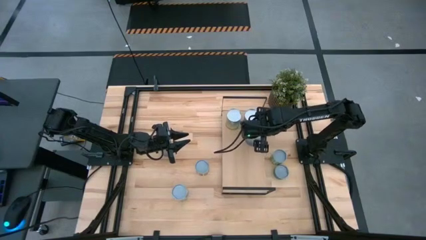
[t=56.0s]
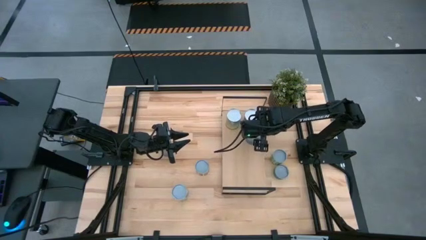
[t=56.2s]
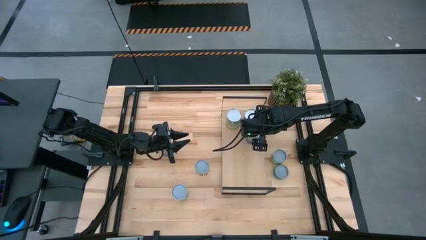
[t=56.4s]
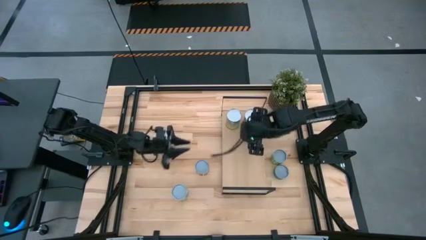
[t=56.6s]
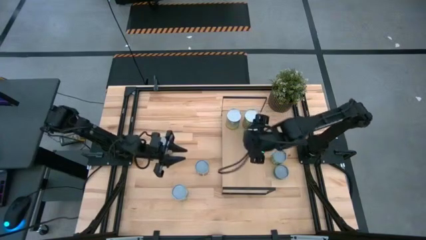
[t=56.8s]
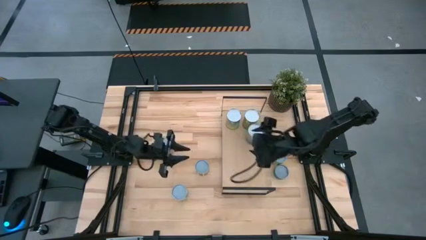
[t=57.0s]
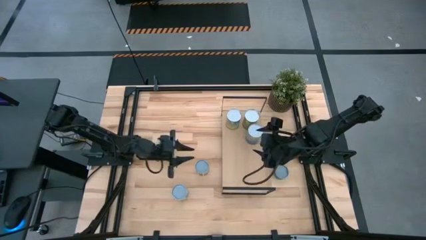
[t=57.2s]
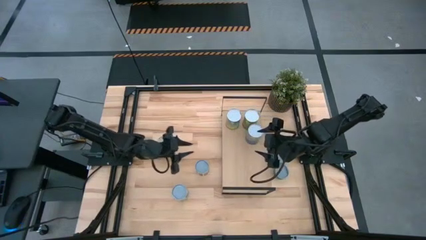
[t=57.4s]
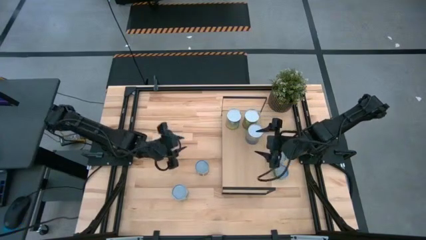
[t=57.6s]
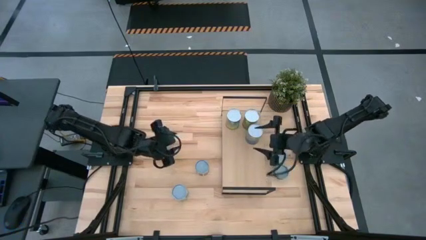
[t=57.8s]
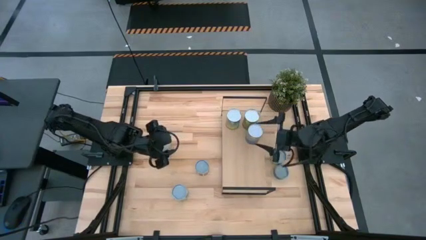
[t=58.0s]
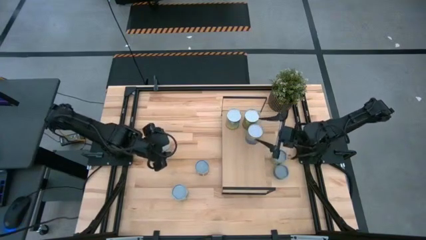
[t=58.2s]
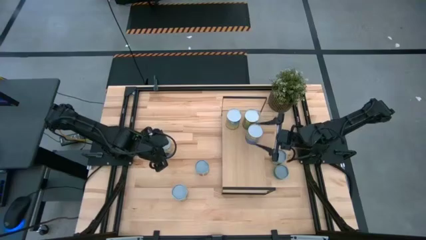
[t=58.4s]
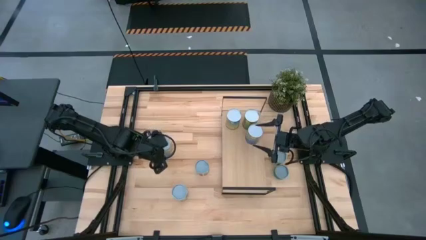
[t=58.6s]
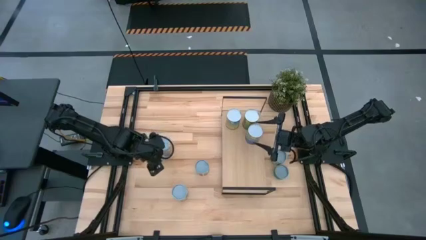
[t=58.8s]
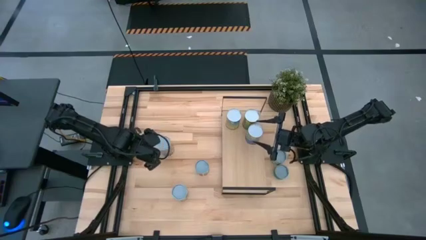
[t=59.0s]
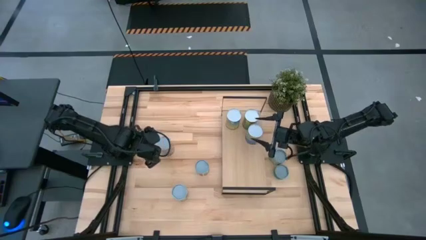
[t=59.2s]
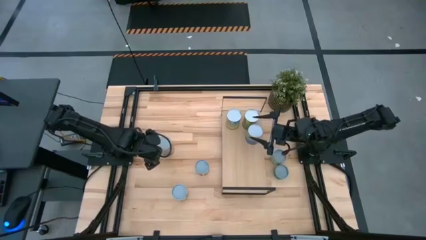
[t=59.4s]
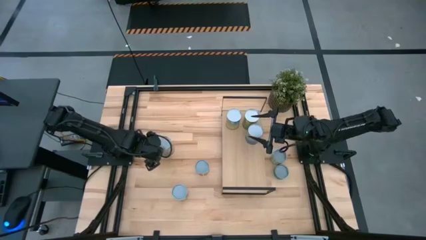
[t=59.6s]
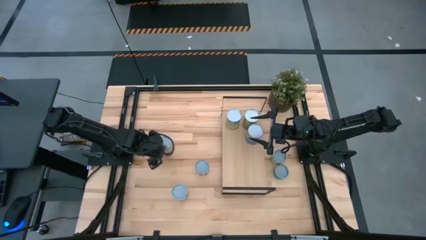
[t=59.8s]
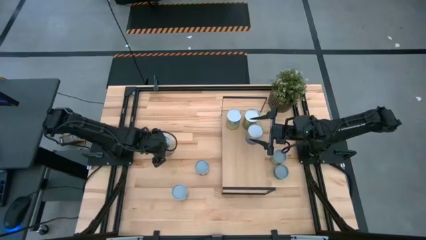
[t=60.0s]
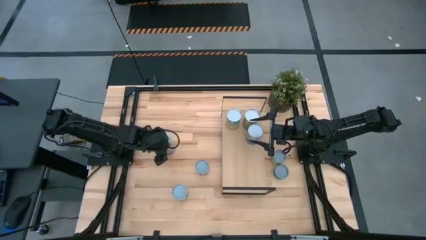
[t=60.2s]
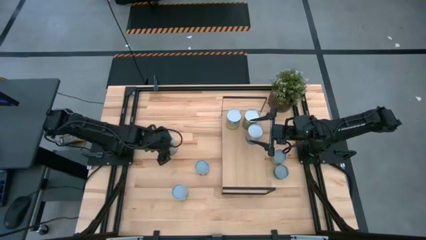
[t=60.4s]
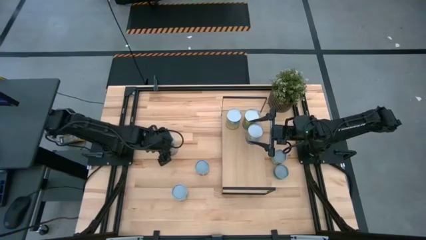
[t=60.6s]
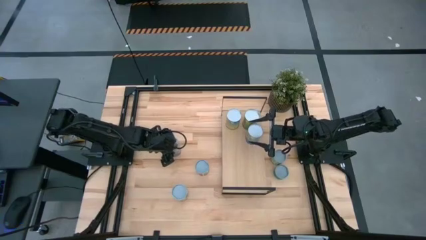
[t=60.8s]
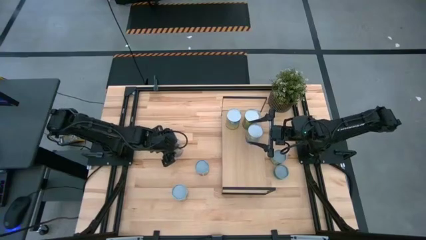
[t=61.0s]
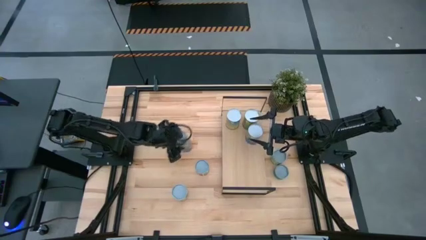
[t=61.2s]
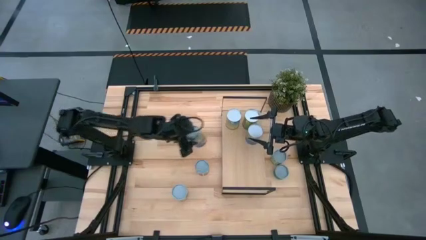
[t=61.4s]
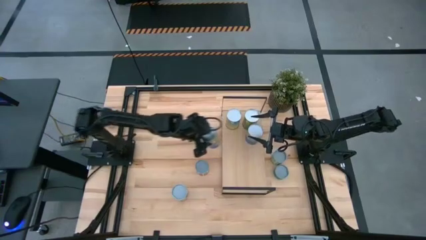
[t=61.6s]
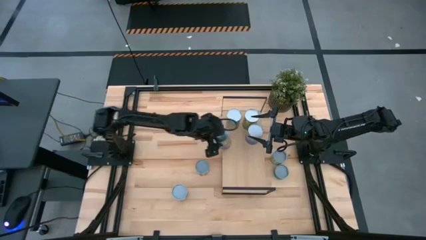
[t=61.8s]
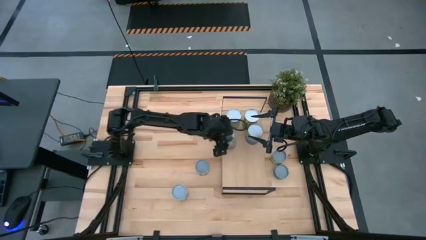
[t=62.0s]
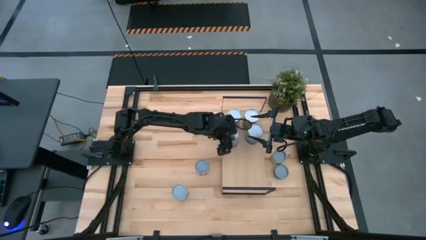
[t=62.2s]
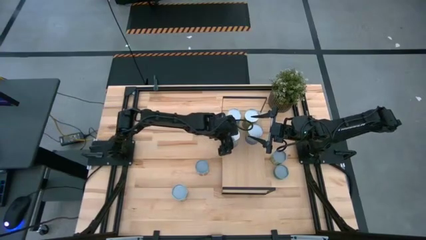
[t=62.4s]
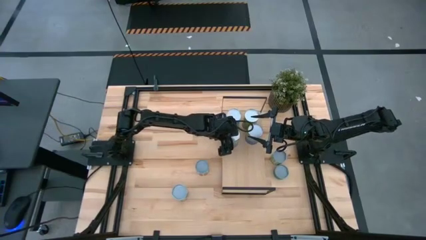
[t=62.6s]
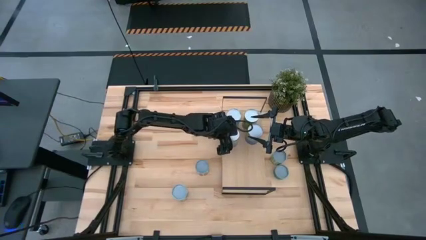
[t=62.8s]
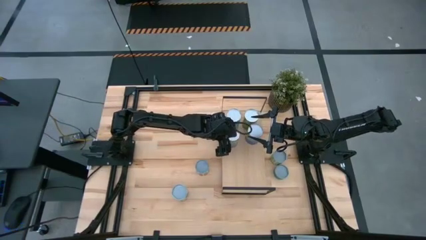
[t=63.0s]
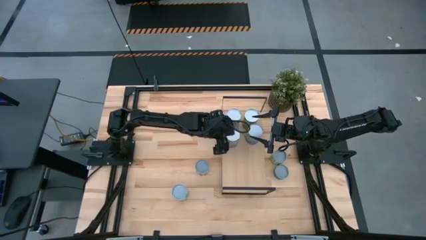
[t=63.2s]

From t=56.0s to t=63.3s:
Task: Pick and place cans onto a shelf
Put the canned peaches on the shelf

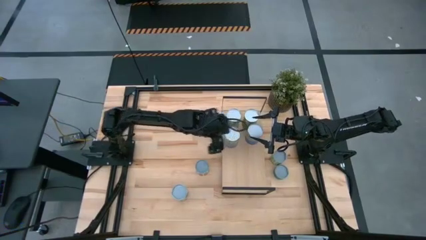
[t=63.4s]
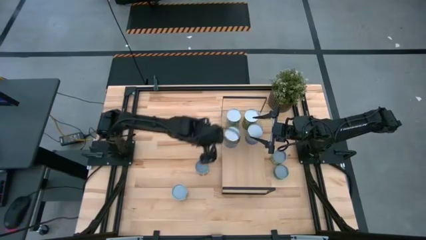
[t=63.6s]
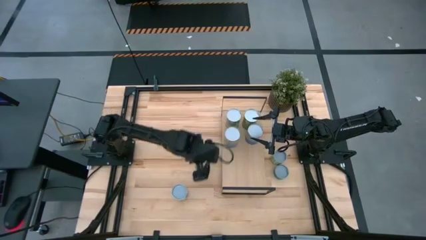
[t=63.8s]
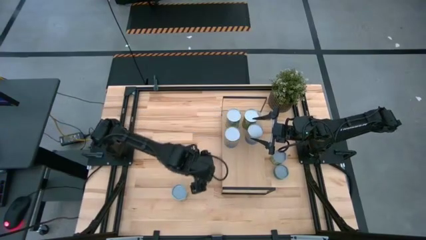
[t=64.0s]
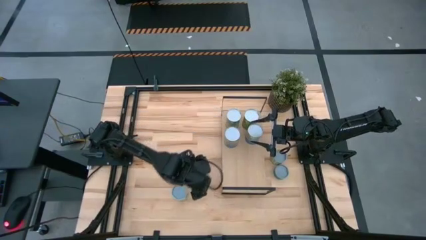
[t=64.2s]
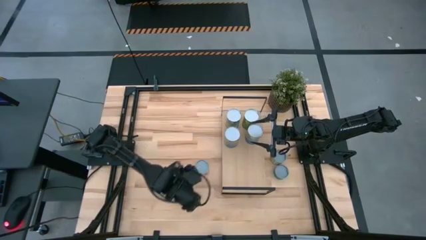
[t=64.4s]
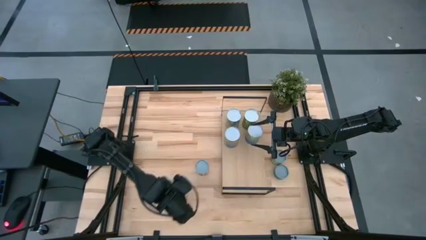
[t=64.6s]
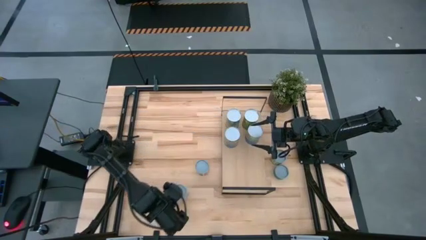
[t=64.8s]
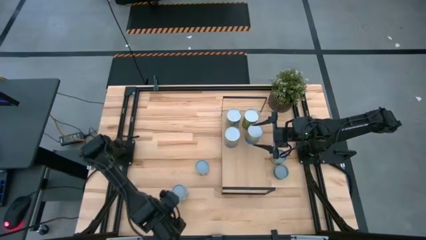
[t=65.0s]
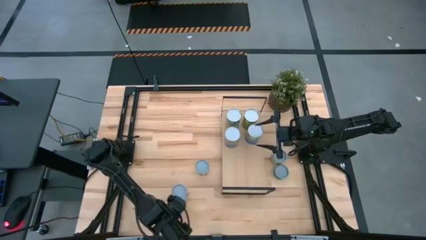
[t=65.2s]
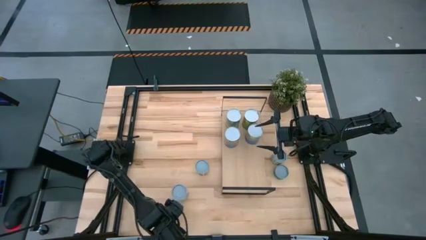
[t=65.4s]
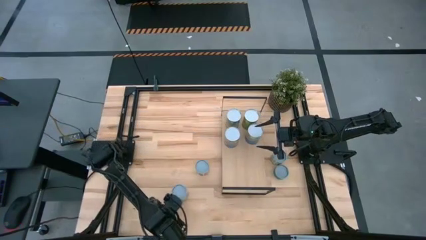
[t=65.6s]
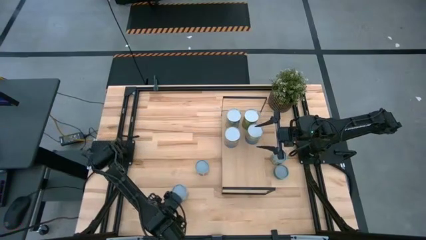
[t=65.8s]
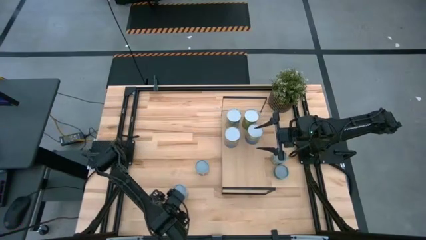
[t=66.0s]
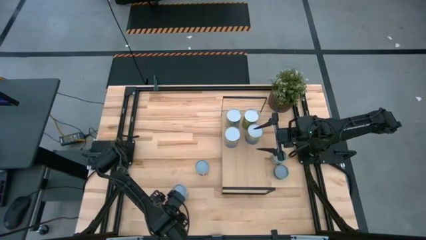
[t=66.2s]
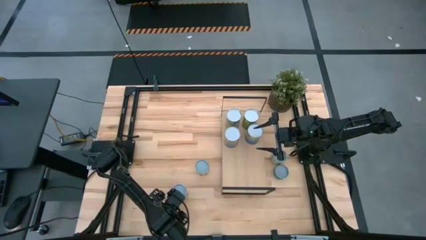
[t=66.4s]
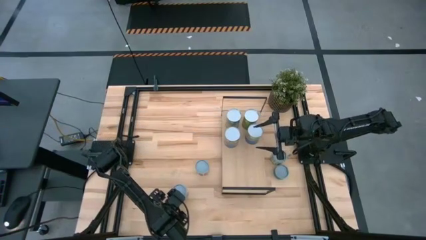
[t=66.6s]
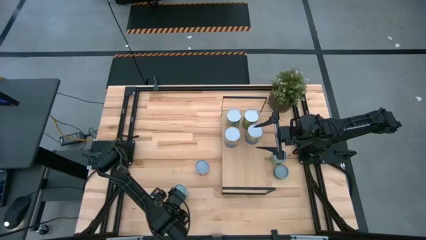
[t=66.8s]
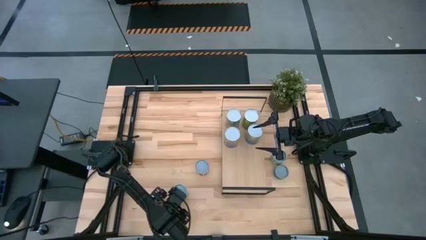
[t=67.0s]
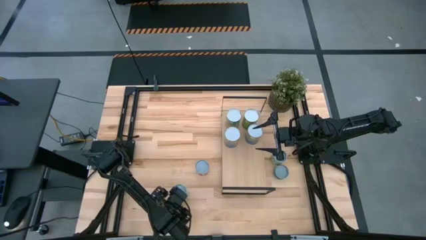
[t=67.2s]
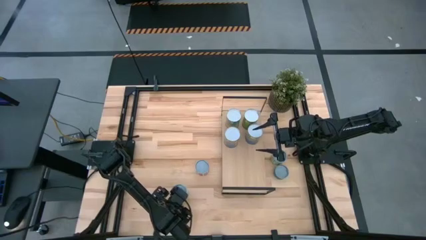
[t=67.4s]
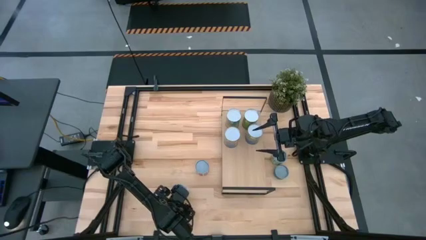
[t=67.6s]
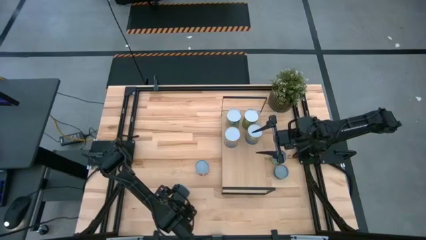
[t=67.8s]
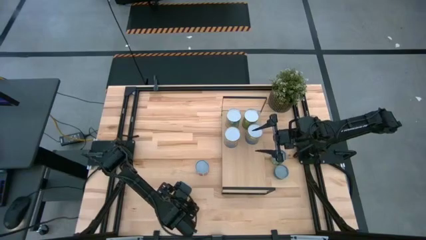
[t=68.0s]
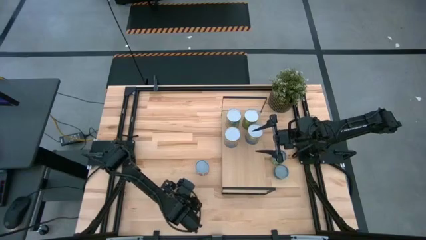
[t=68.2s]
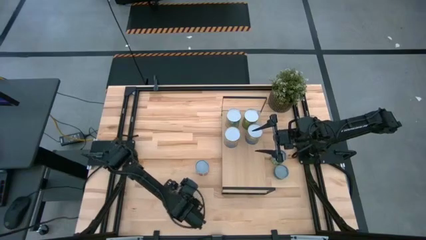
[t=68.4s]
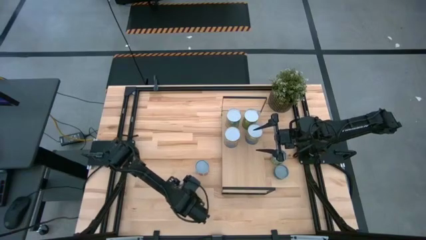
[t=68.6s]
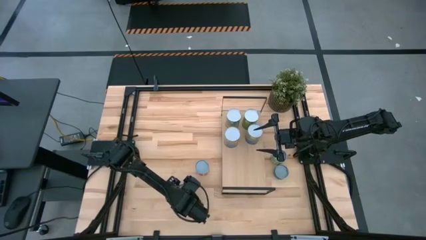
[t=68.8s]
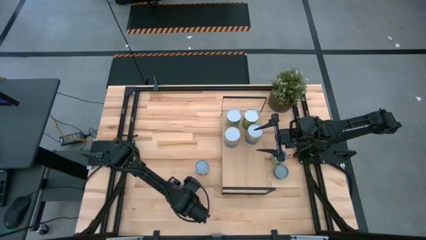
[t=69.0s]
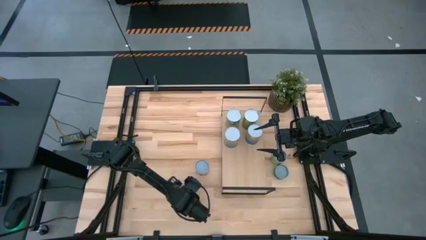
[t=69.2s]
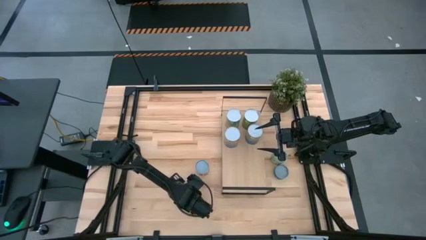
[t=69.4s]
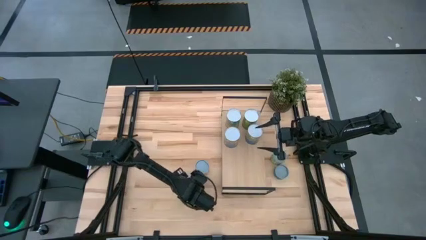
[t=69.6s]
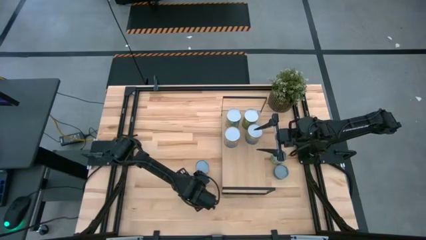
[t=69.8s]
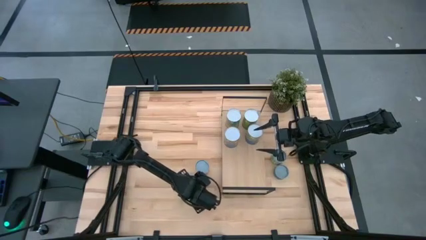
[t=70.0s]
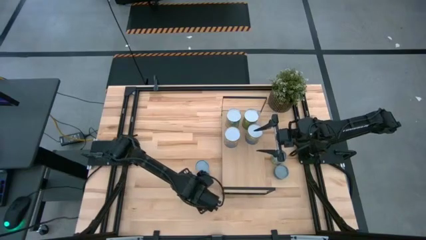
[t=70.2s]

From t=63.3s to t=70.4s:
Adjust the canned mixed vegetables on the shelf

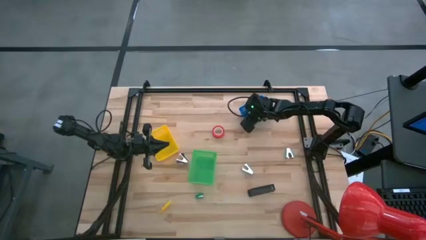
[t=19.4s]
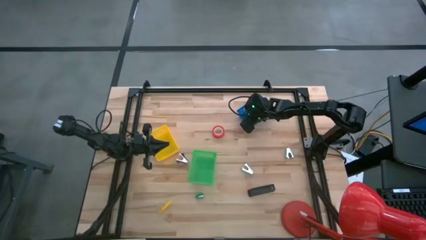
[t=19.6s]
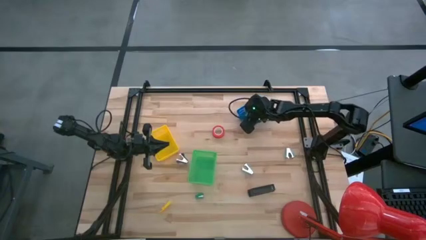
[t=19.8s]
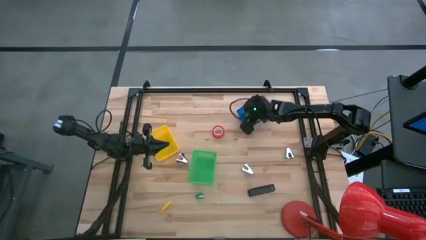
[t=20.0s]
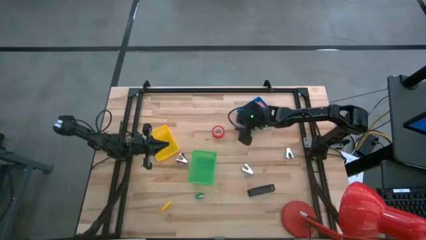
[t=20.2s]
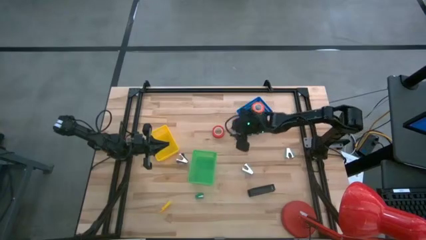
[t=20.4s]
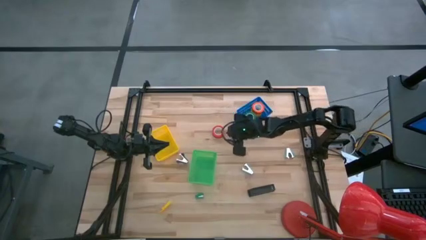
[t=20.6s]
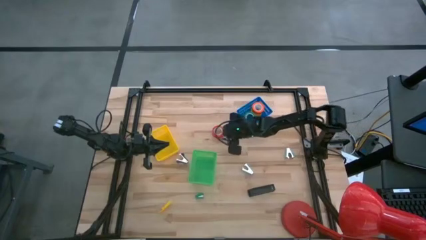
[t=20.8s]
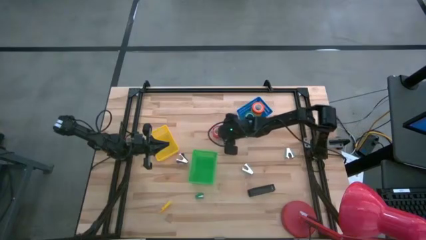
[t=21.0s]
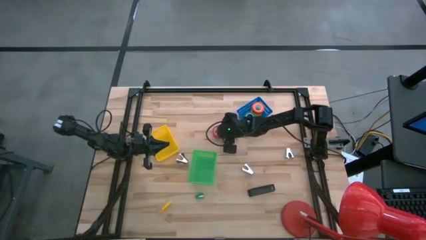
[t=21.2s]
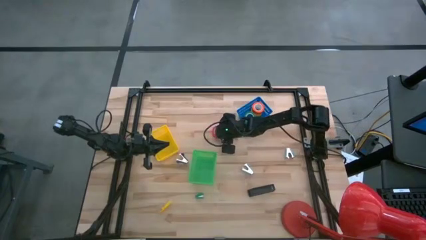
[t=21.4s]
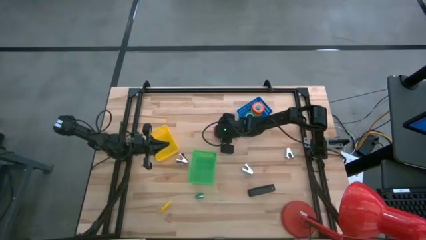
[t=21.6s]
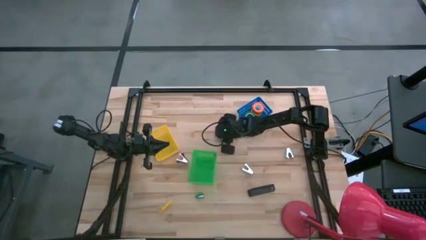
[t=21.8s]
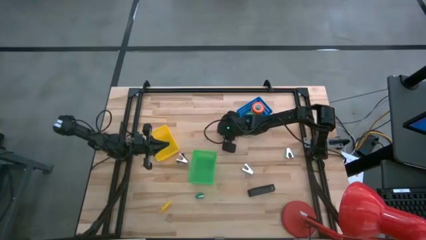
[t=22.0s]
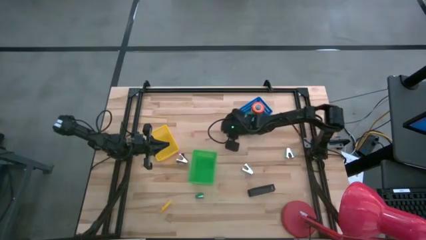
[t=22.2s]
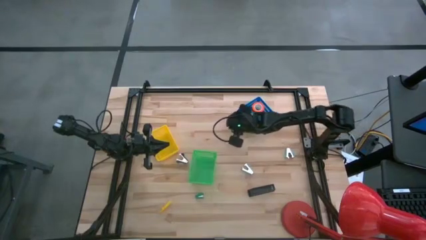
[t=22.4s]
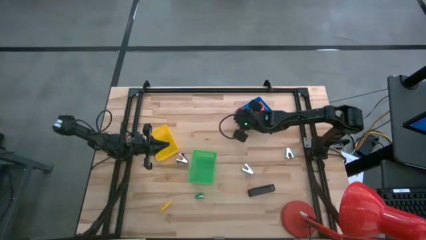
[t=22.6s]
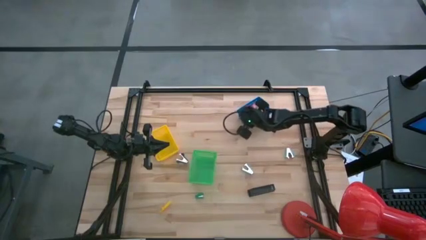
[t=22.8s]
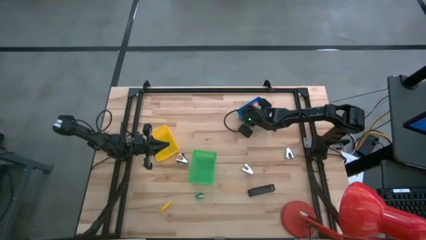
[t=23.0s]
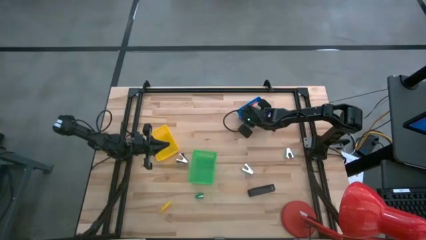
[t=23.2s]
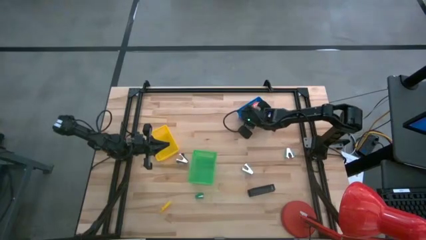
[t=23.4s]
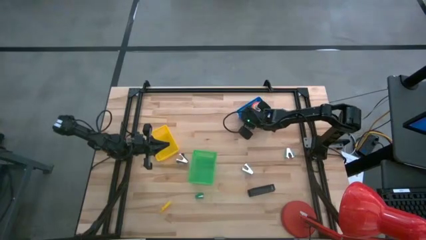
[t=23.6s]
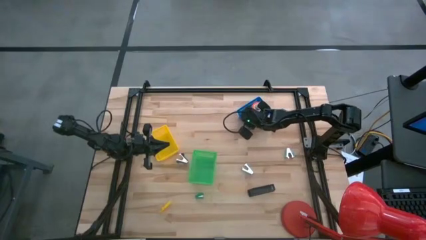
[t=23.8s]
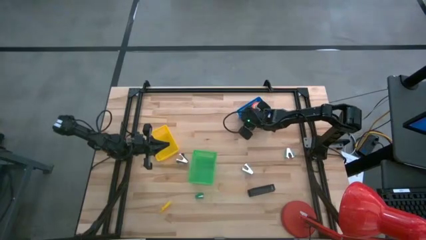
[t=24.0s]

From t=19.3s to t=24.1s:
Task: Pick and place Stapler, Stapler remover, tape
Put the red tape into the blue bin
